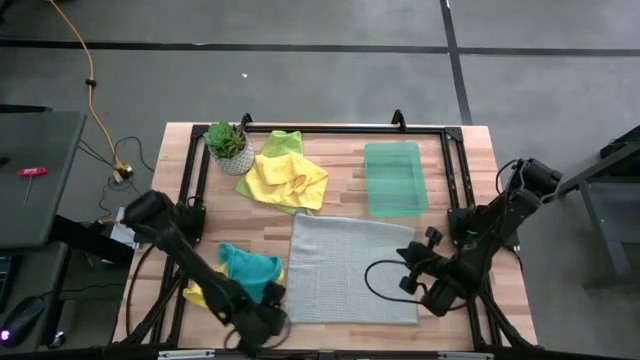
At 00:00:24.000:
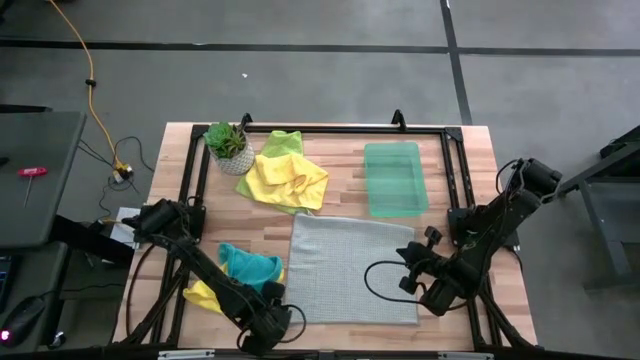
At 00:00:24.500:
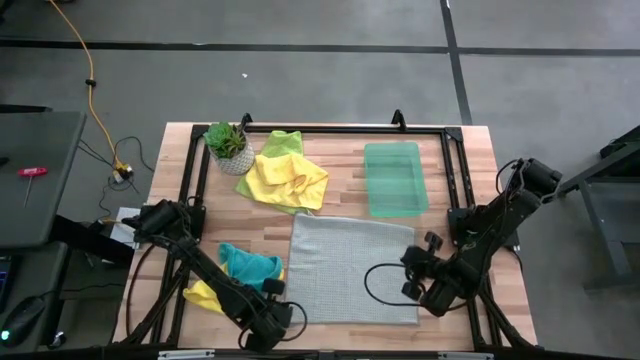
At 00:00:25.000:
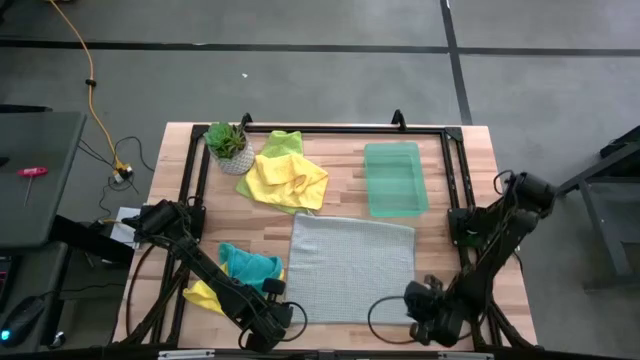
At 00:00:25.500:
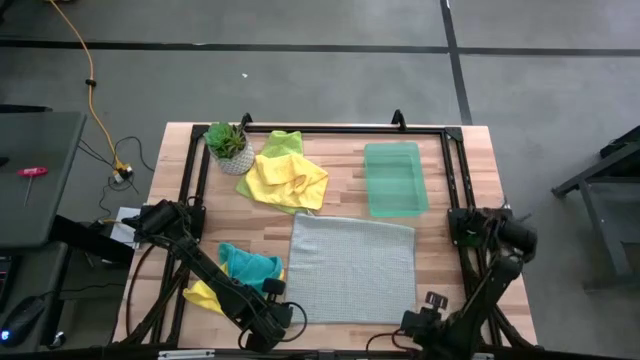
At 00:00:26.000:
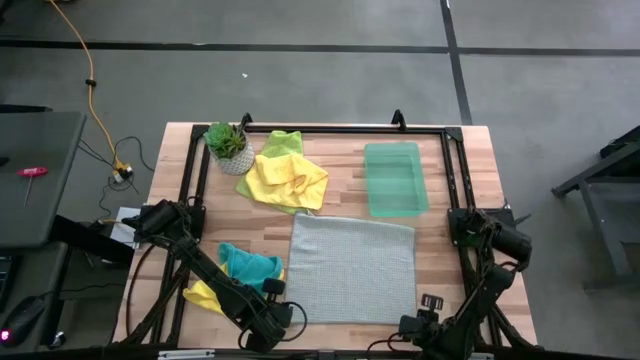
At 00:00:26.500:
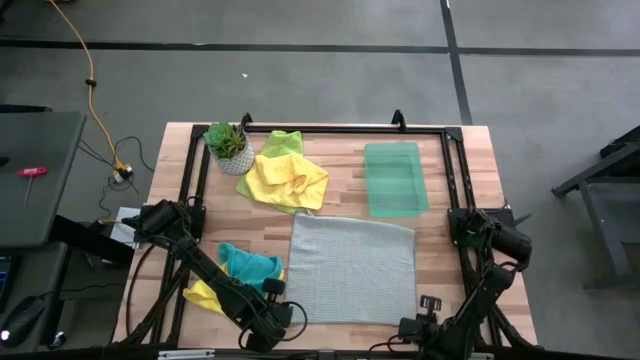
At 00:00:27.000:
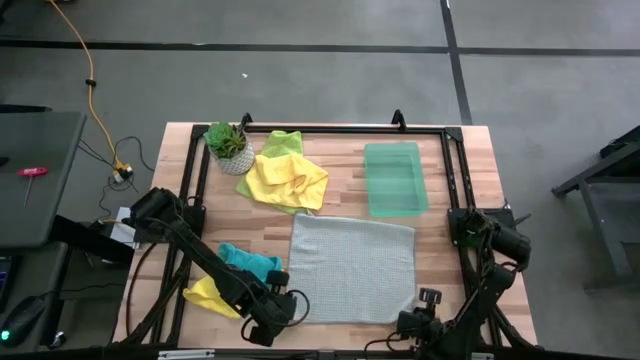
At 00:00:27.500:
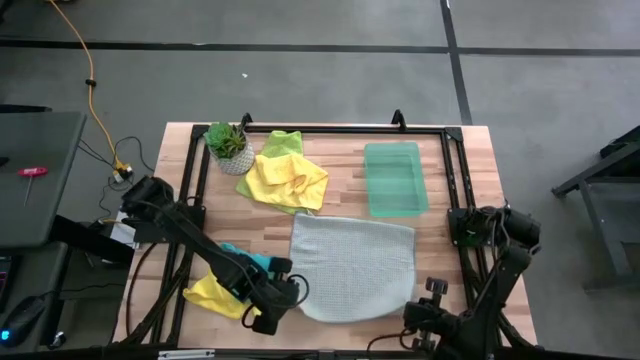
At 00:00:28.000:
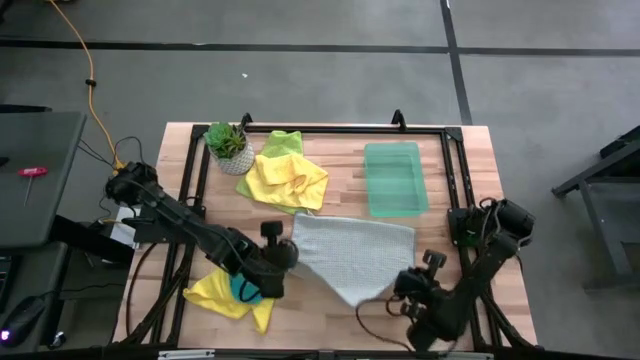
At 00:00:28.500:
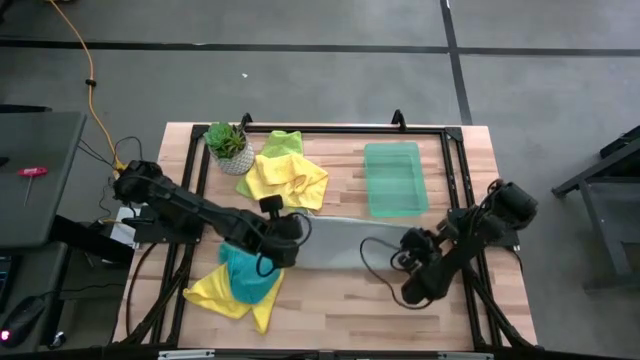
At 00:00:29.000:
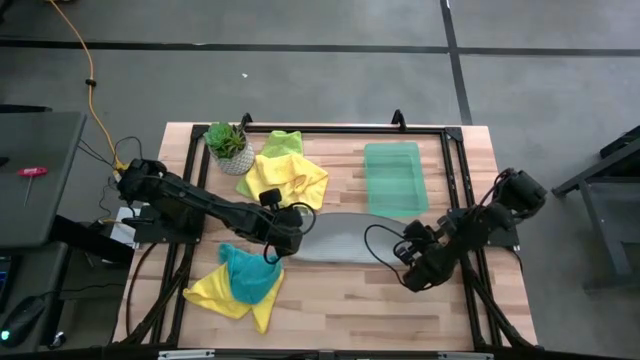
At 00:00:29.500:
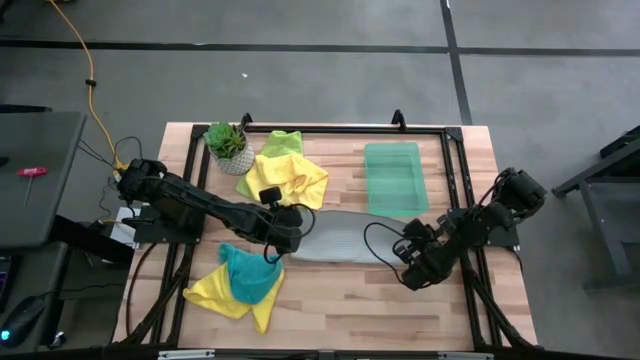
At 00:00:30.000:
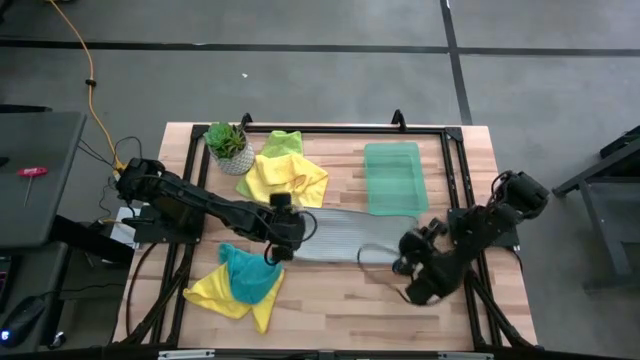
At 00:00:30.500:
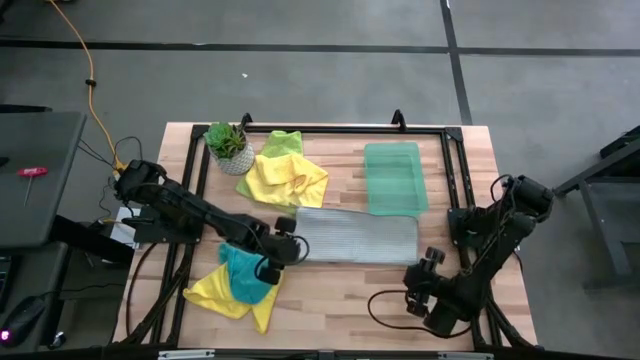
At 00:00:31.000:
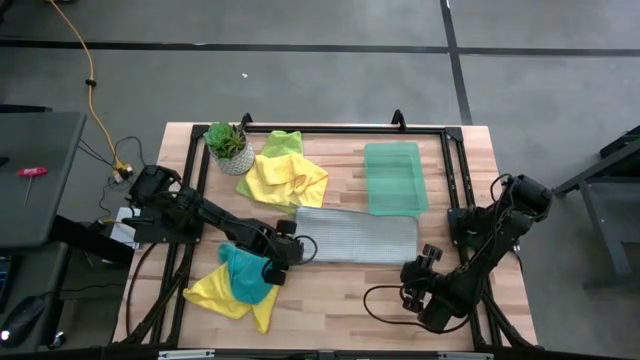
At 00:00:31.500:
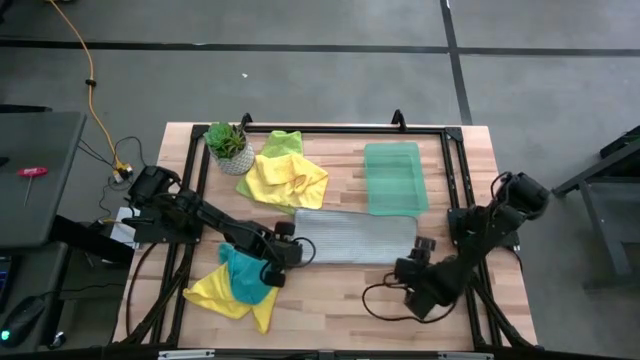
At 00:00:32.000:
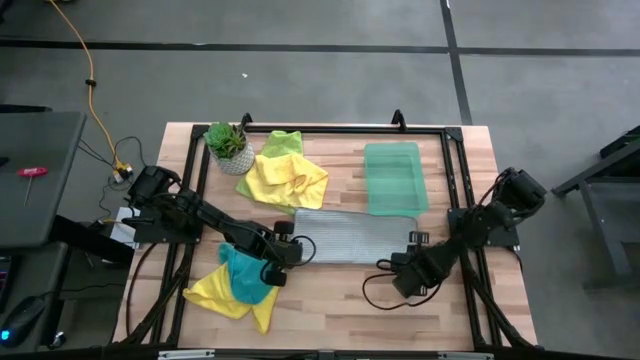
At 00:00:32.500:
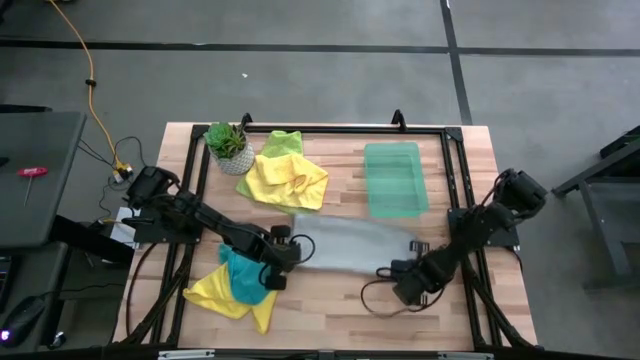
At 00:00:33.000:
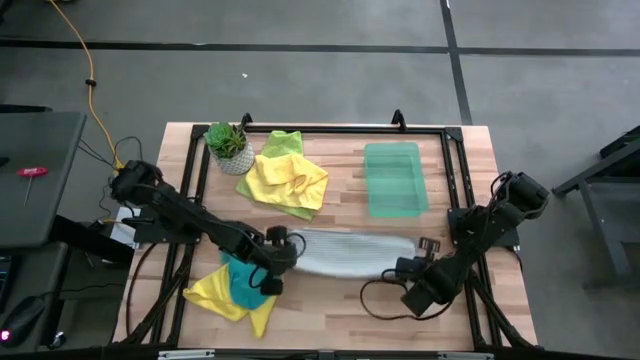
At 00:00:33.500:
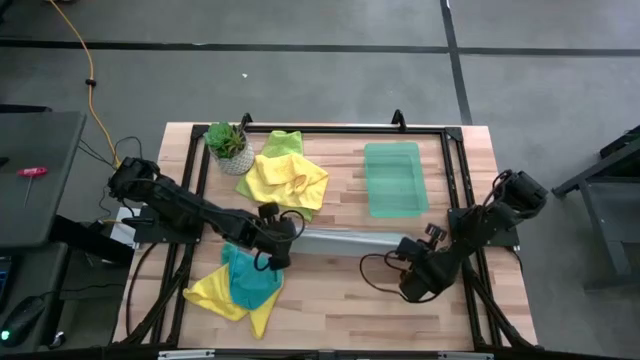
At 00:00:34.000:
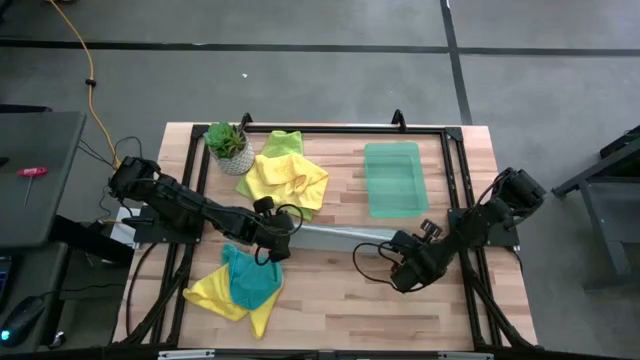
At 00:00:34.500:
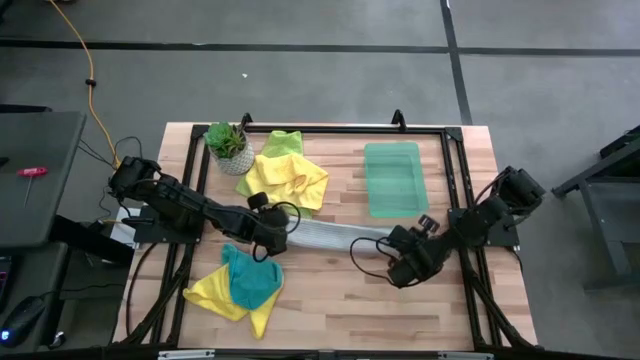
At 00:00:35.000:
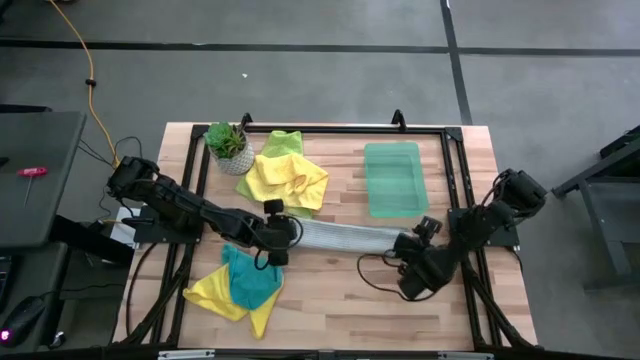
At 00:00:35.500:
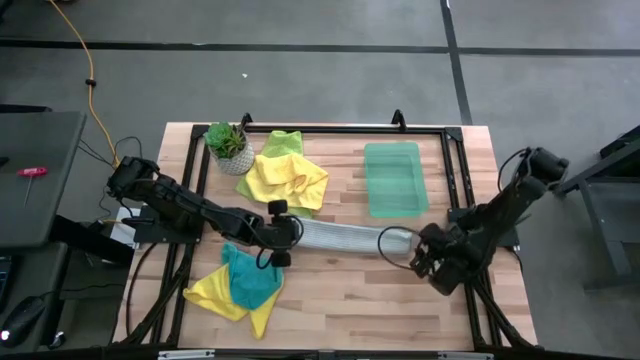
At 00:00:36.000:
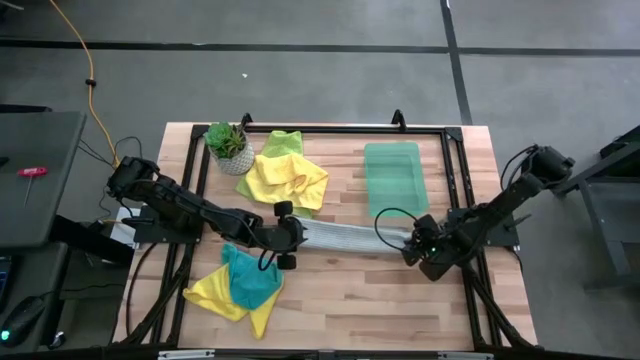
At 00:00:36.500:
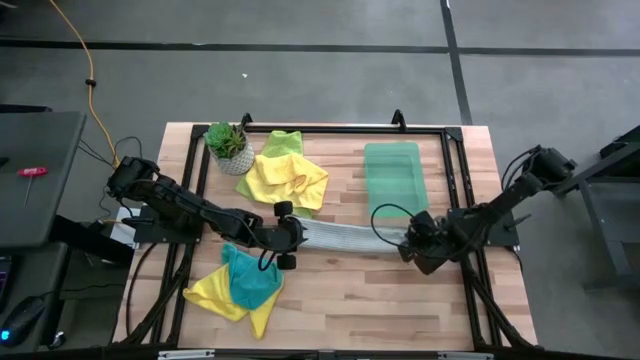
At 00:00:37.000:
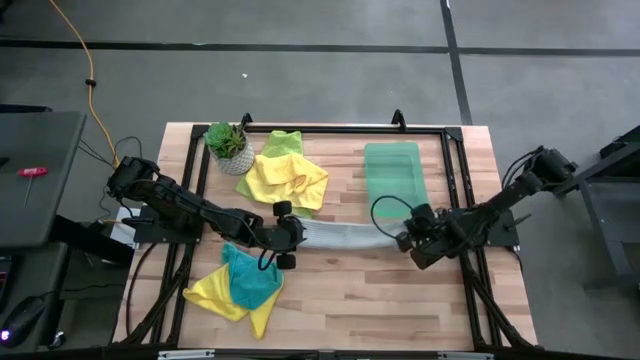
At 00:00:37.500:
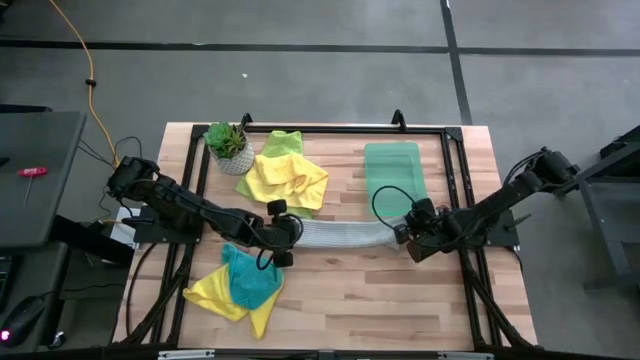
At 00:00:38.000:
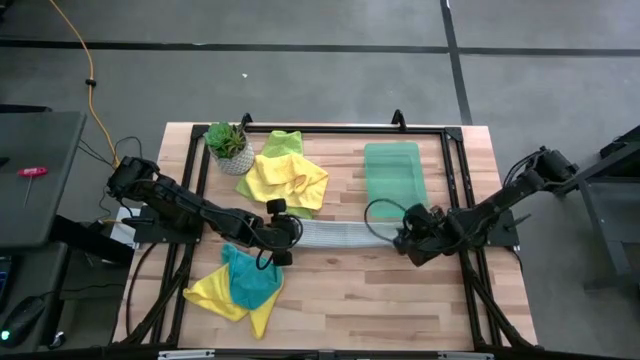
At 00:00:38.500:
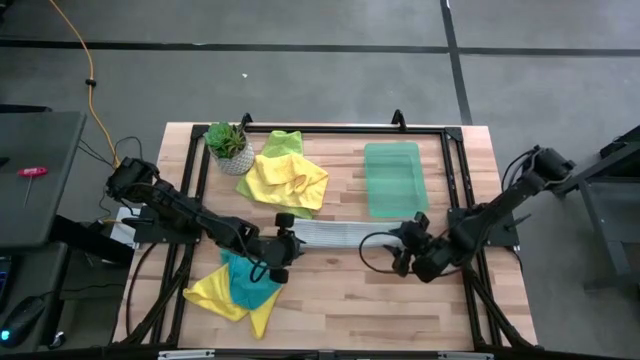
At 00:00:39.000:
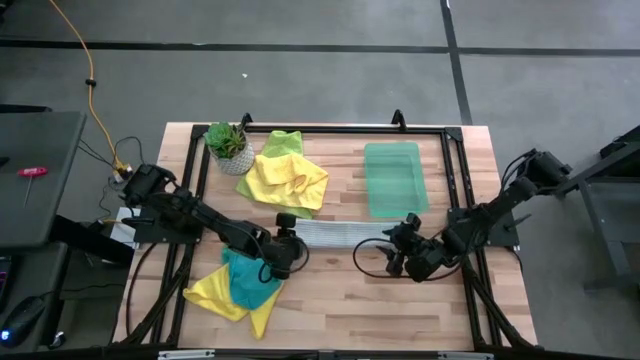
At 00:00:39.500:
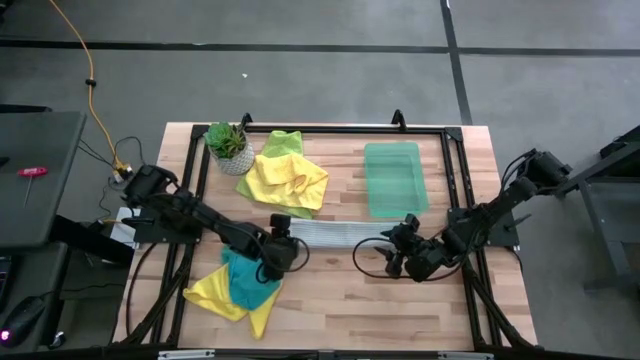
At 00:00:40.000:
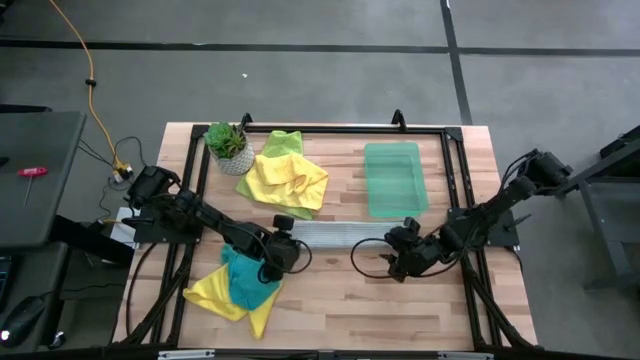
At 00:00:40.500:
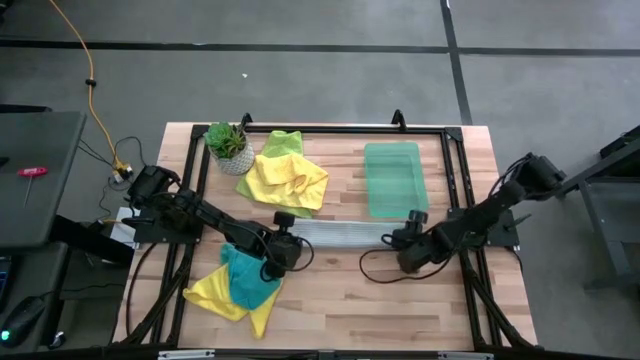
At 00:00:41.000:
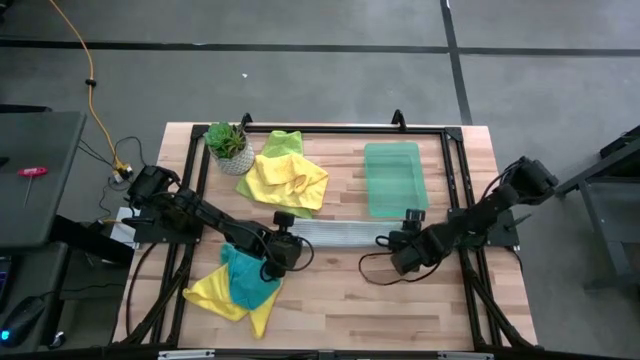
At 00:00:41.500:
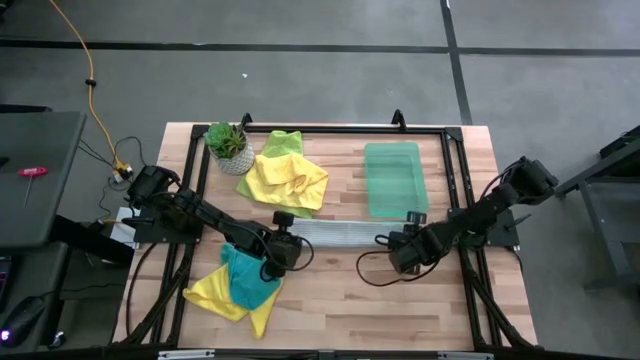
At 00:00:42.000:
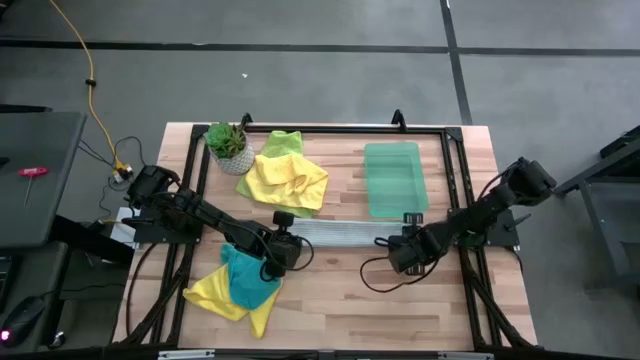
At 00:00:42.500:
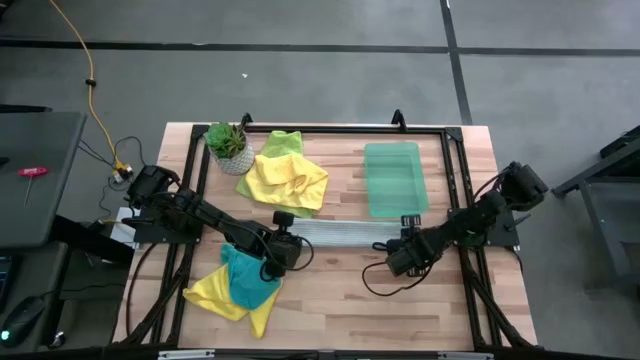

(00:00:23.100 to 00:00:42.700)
Task: Fold microfiber towels
Fold the gray microfiber cloth
